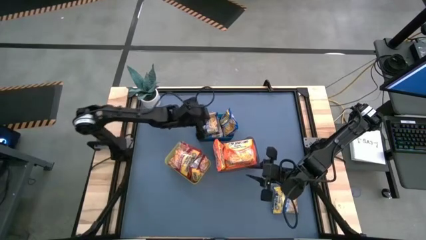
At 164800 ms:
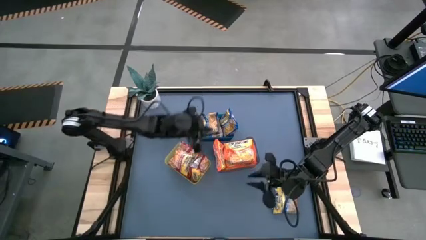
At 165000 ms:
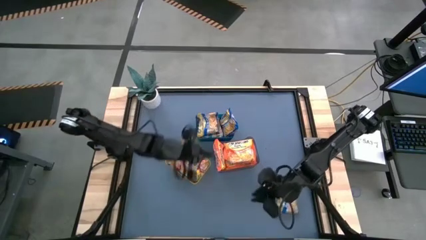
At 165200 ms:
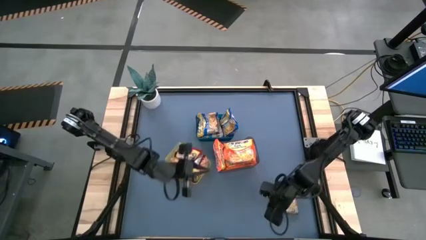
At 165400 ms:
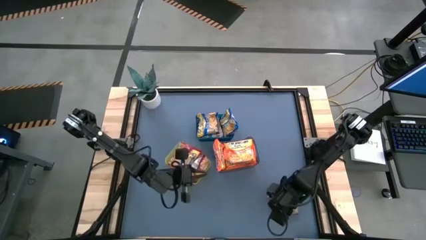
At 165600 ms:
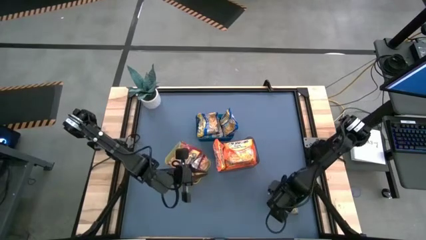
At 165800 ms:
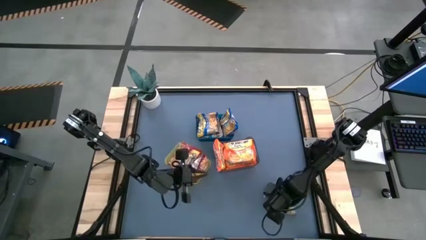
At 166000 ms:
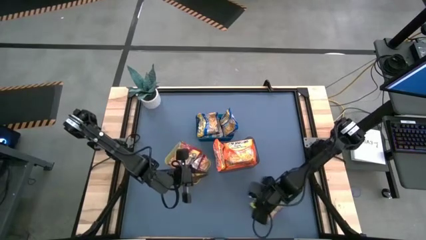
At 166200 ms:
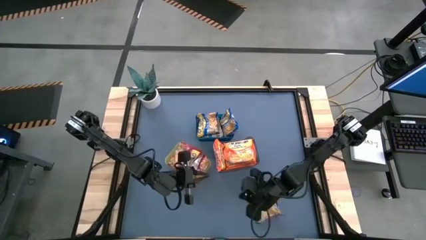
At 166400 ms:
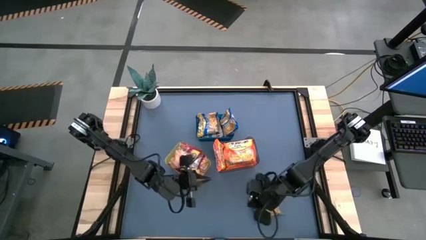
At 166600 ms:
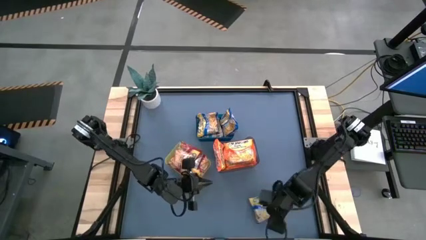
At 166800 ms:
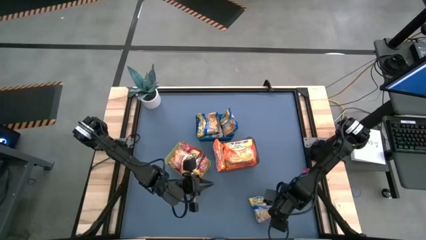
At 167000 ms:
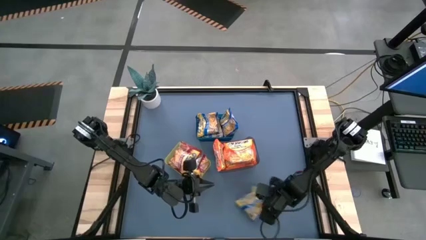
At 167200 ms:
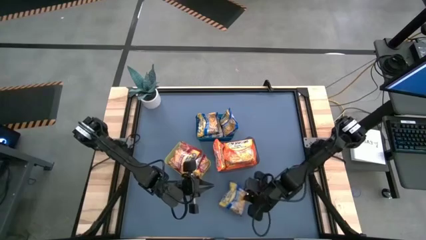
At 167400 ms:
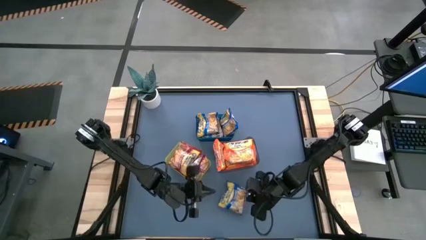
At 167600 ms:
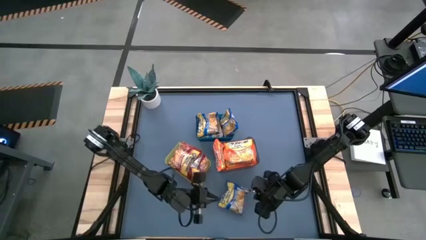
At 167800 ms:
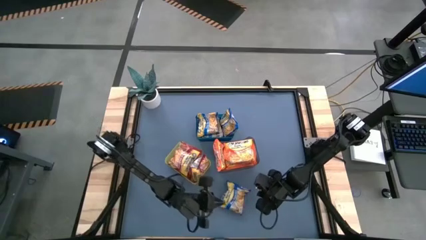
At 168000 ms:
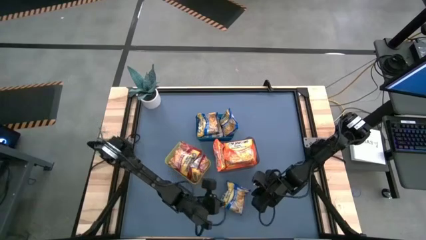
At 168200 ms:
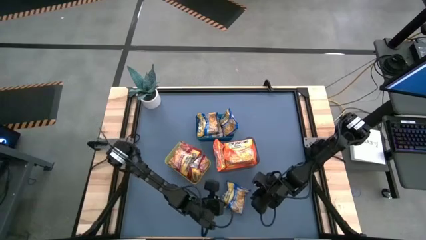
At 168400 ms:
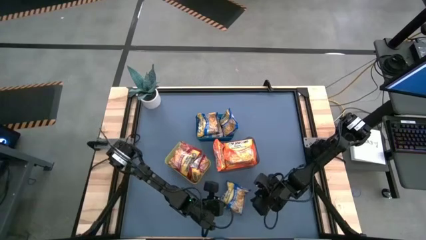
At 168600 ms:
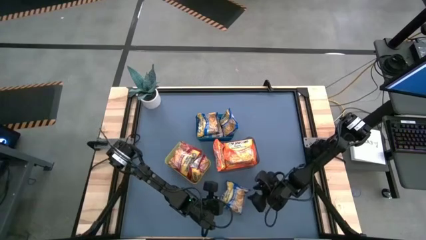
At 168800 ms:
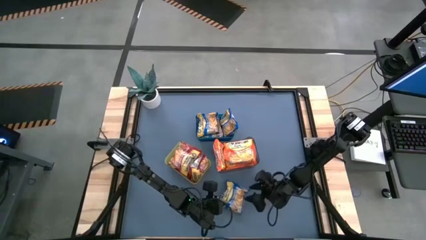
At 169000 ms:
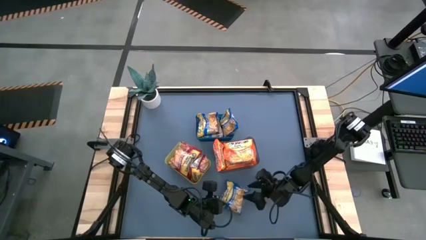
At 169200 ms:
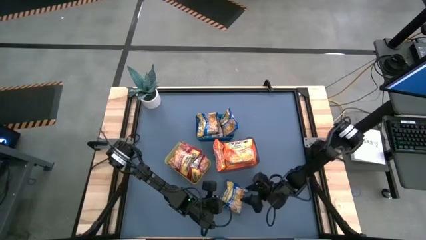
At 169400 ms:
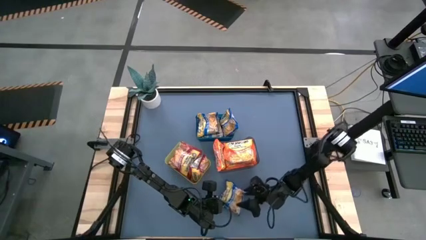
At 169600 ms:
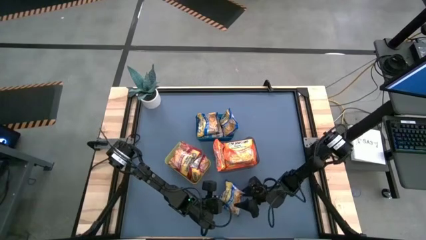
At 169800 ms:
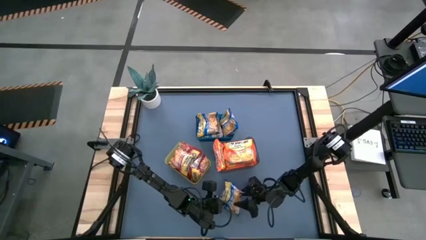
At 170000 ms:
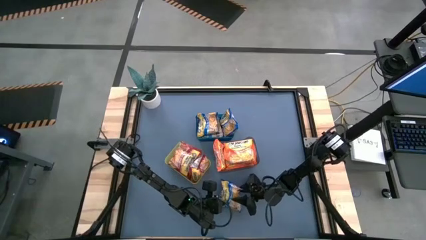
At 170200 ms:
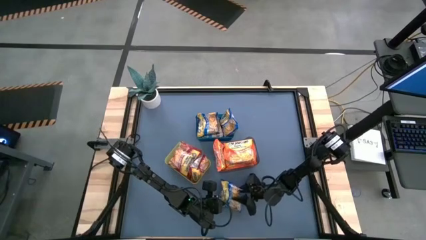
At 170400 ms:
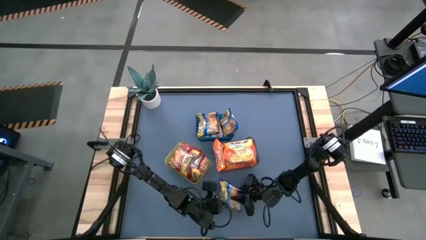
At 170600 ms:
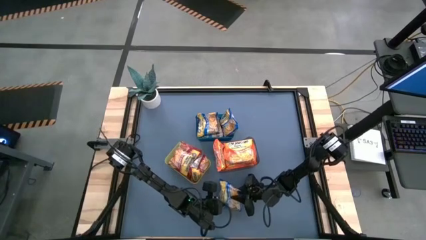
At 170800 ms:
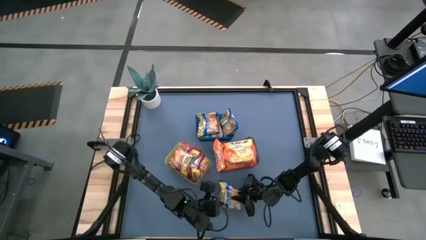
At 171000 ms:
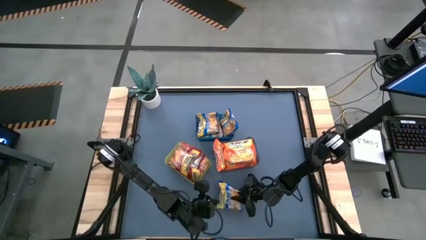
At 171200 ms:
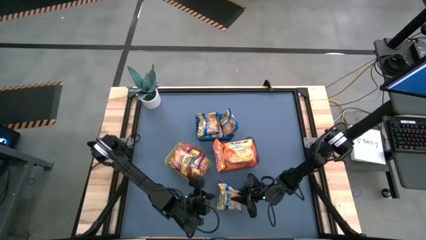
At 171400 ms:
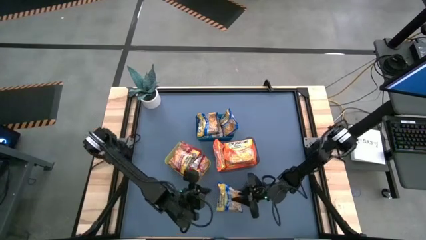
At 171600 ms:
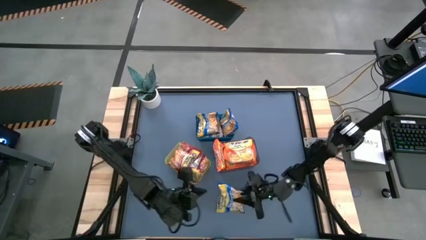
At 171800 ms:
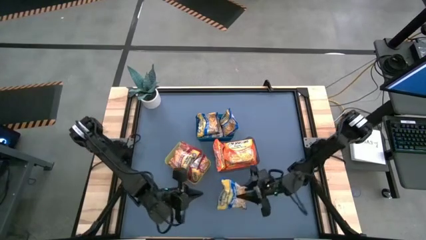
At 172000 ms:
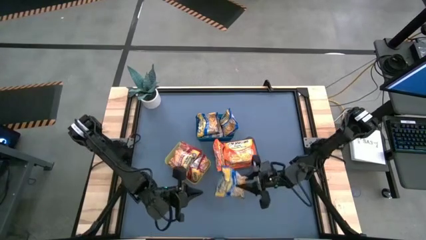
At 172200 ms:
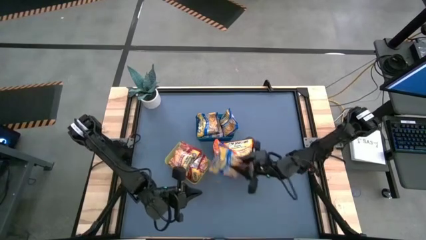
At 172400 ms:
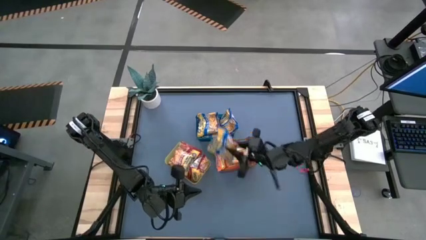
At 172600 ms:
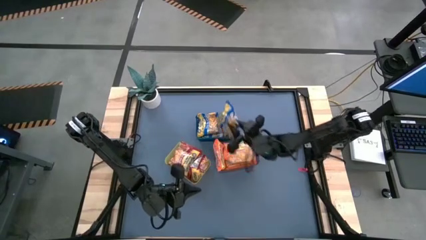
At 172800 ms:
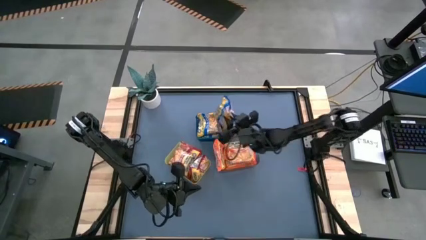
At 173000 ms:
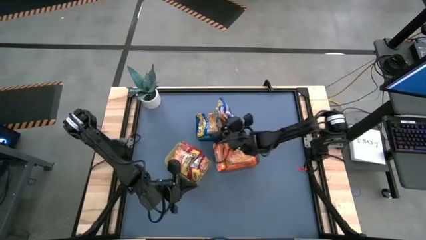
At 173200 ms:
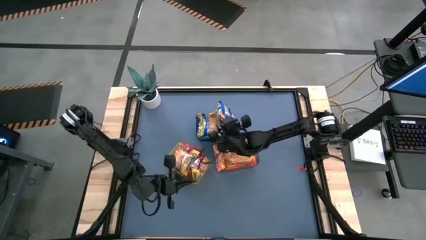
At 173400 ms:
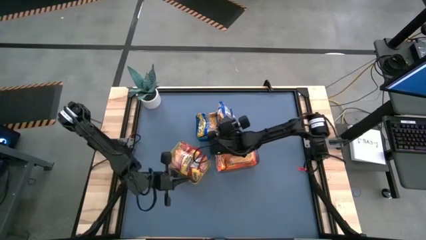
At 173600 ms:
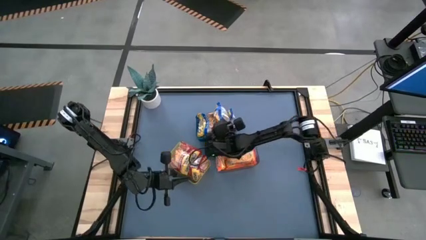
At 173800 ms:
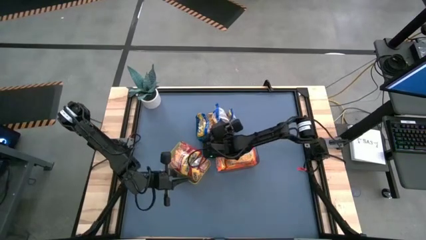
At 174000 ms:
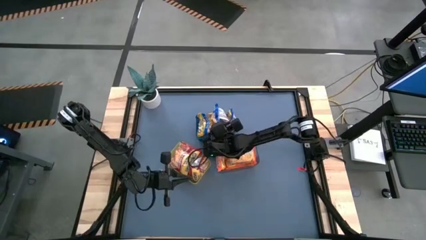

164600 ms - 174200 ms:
Task: Sort Maruchan noodles
Put the blue noodle pack into the blue bin

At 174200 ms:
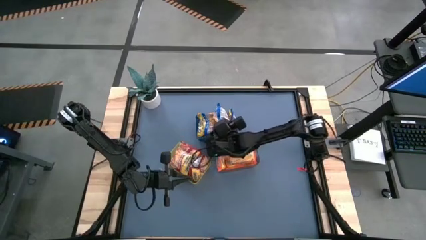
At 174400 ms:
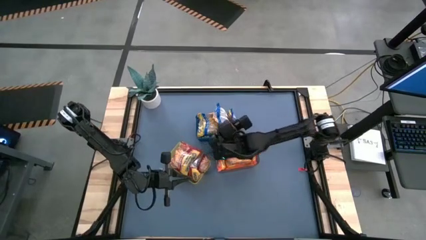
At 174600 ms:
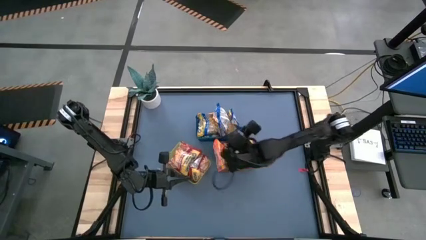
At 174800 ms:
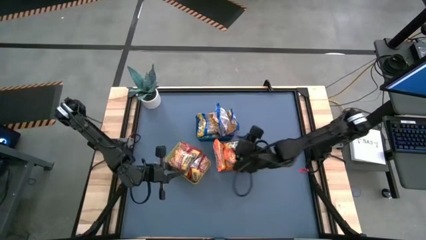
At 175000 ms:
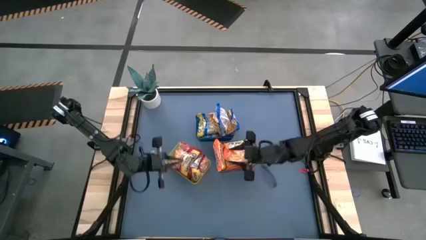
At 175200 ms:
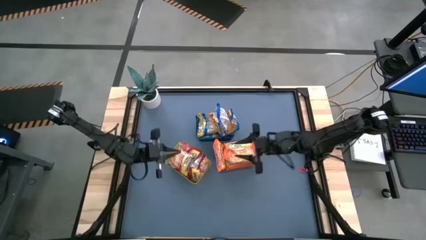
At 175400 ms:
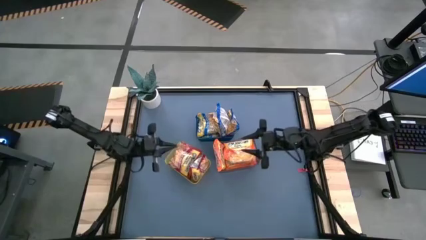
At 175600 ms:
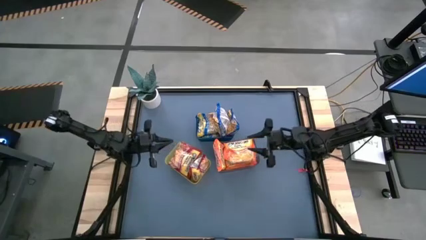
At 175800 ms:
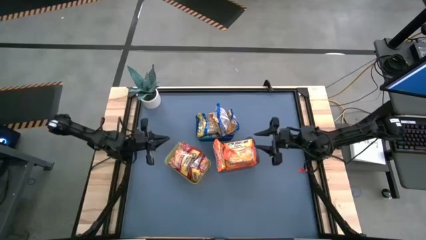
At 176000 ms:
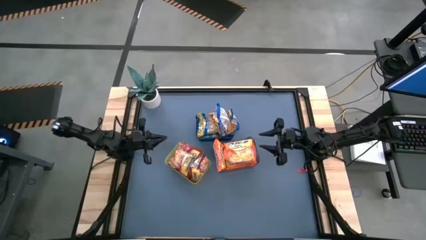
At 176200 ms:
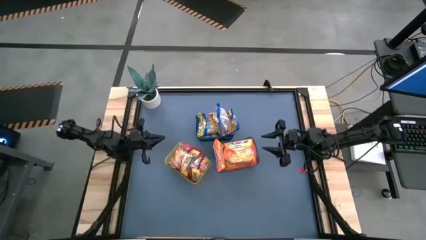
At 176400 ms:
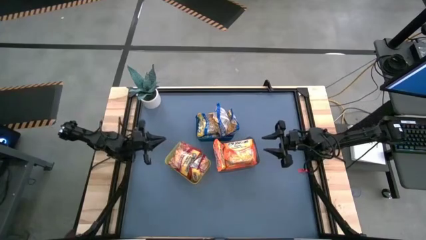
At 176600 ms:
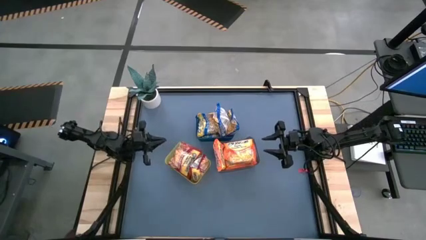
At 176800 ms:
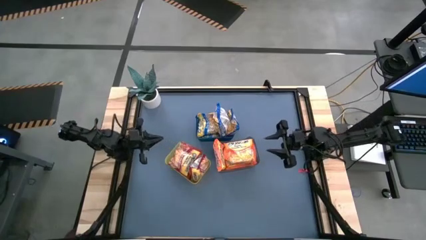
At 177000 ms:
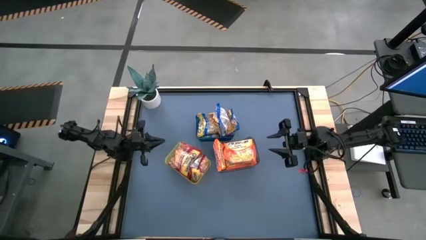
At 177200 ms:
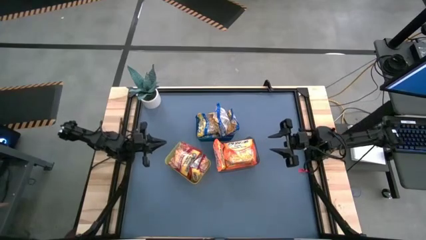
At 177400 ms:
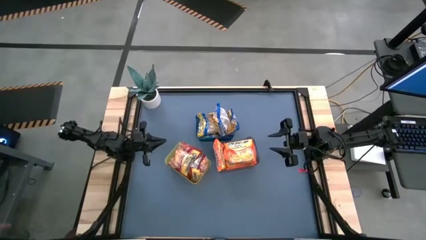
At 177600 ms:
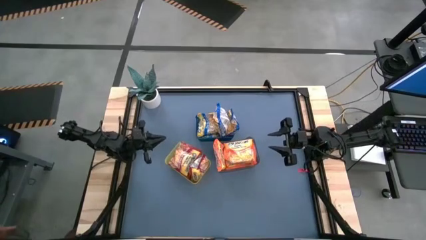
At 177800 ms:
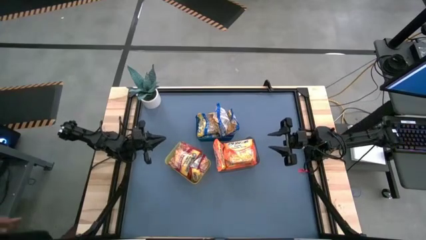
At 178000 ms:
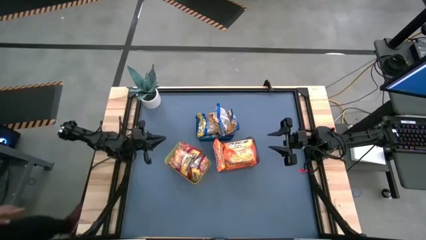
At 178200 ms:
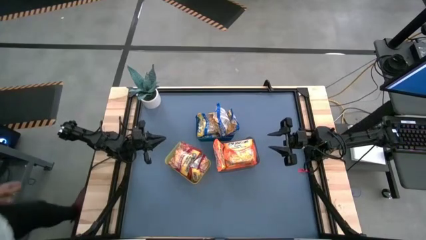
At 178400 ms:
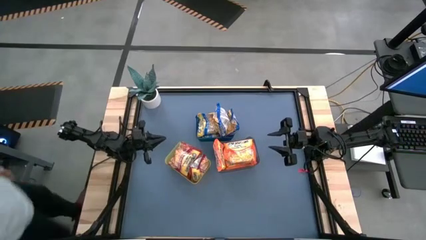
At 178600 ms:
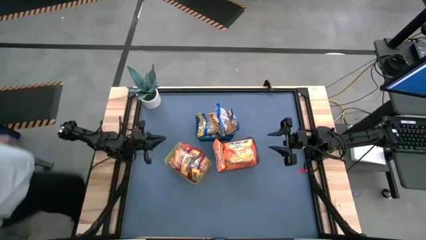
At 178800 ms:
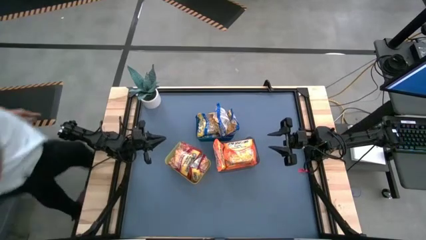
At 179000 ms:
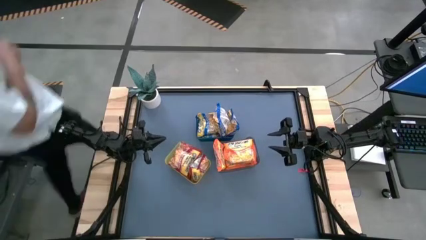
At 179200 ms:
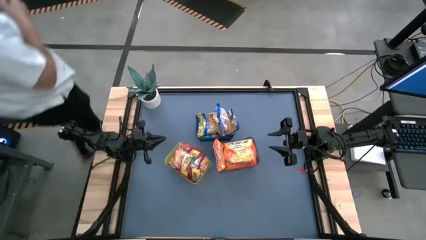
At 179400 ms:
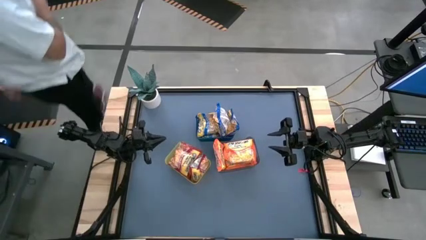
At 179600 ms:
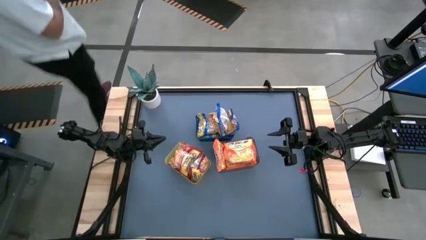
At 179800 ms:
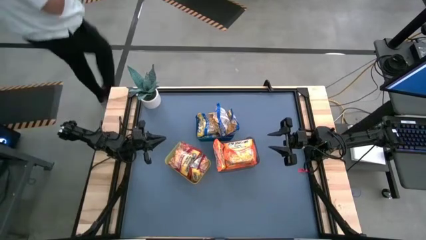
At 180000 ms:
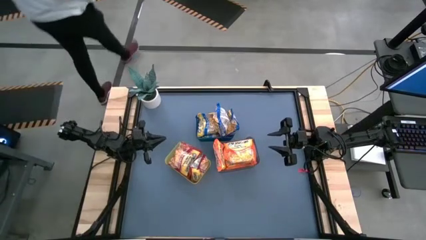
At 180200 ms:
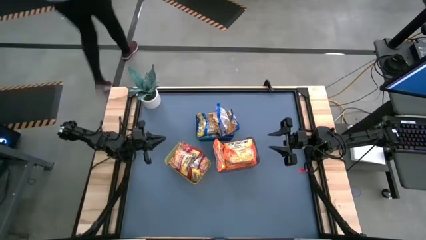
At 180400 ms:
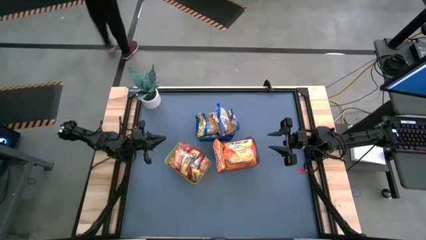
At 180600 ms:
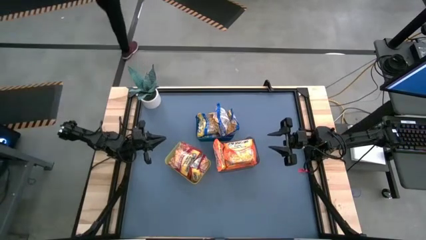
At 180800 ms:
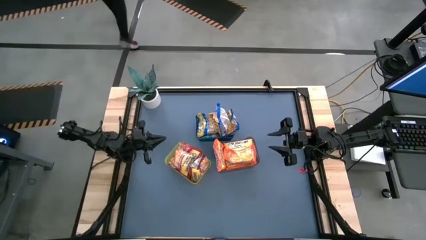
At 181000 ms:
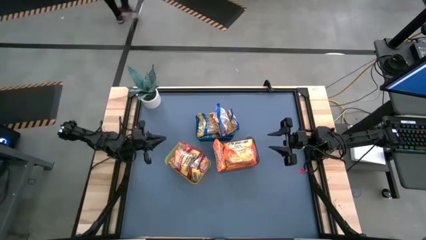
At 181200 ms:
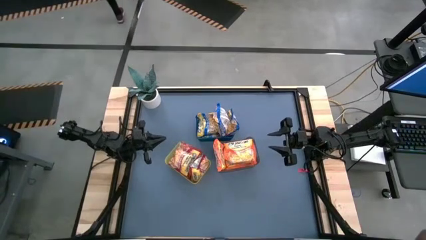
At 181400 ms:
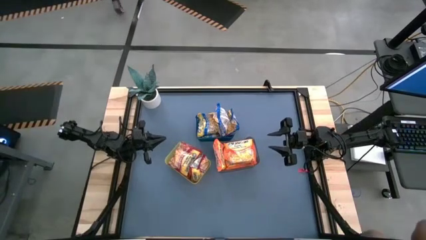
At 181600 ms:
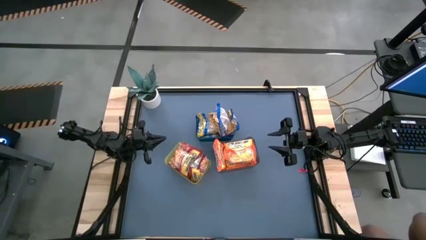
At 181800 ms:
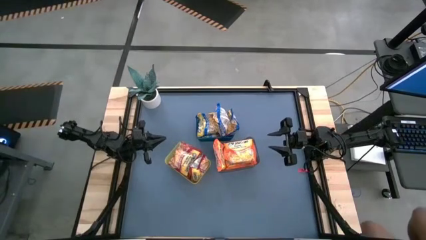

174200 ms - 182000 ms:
Return to Home Position
